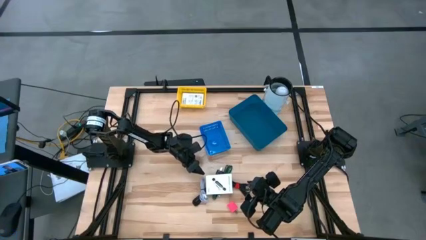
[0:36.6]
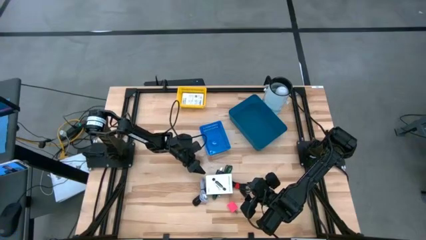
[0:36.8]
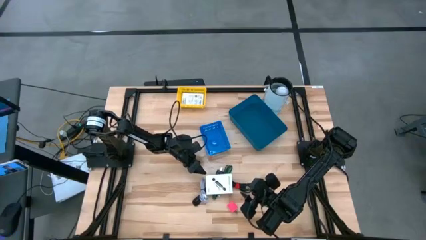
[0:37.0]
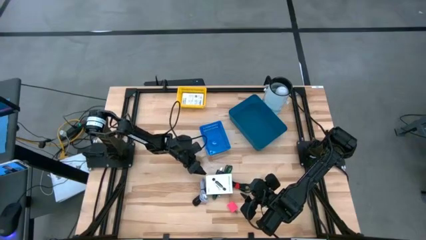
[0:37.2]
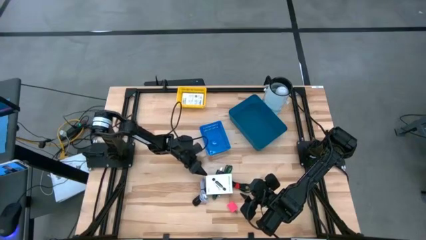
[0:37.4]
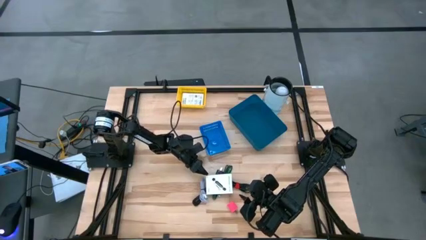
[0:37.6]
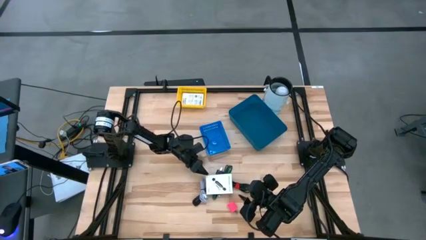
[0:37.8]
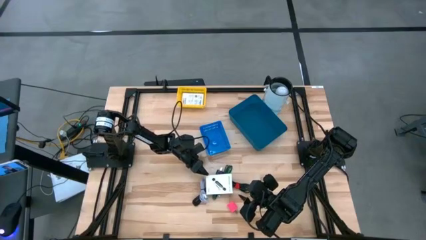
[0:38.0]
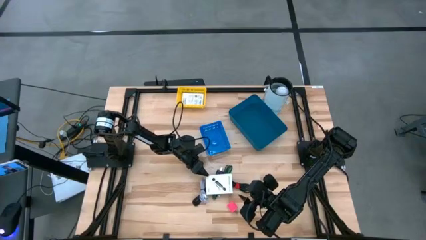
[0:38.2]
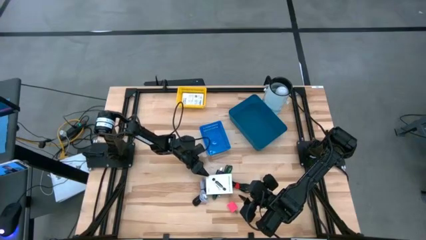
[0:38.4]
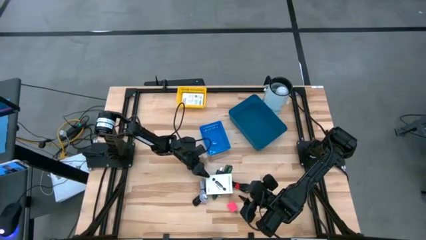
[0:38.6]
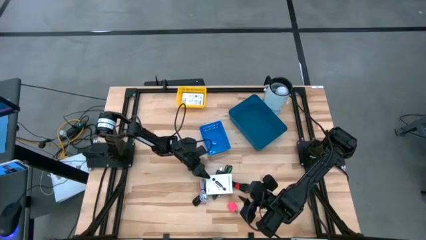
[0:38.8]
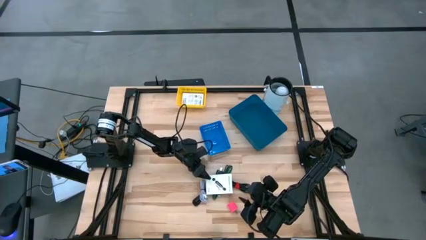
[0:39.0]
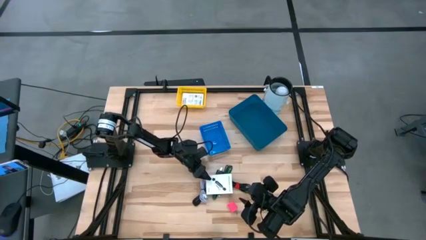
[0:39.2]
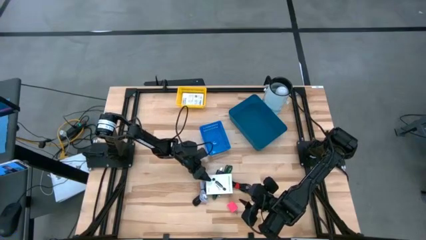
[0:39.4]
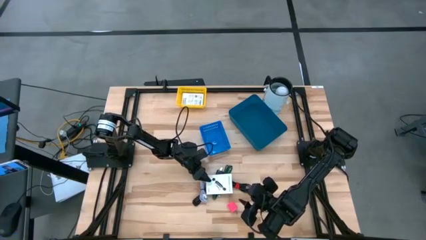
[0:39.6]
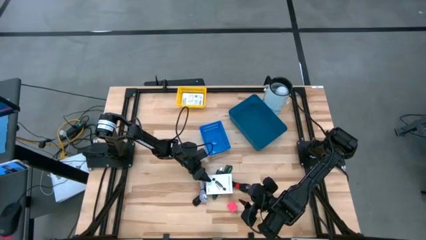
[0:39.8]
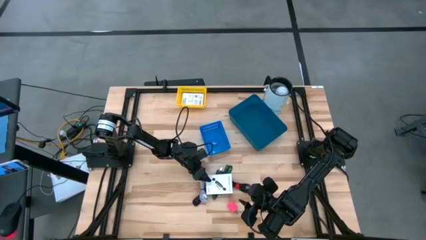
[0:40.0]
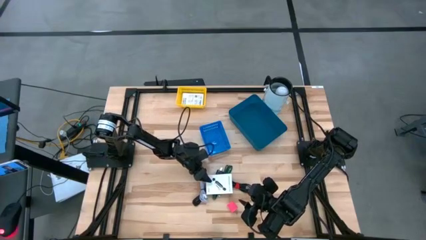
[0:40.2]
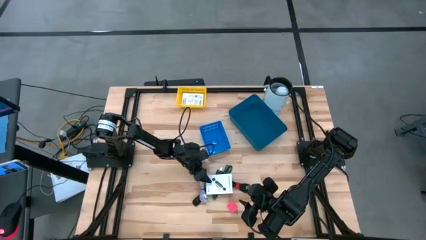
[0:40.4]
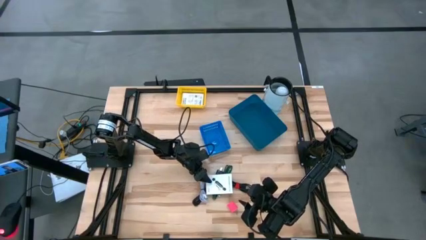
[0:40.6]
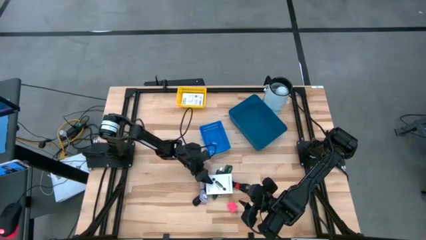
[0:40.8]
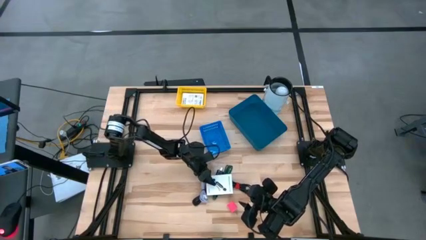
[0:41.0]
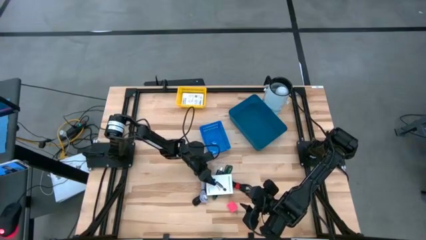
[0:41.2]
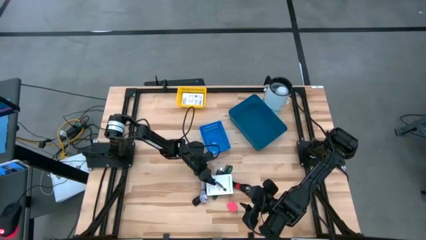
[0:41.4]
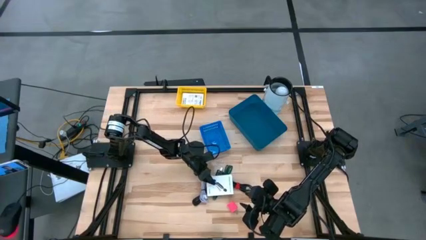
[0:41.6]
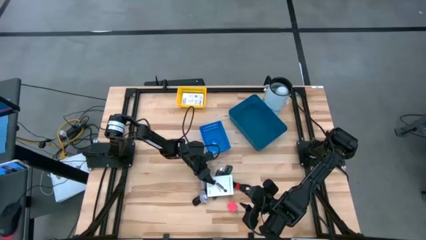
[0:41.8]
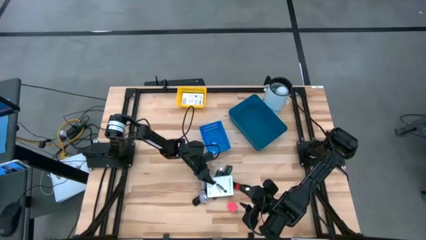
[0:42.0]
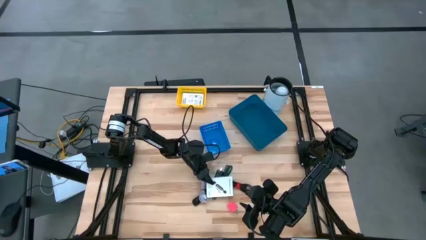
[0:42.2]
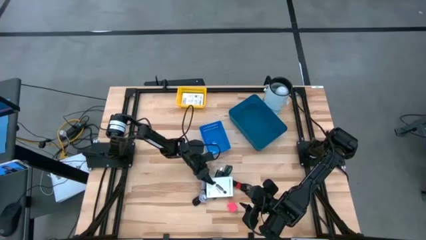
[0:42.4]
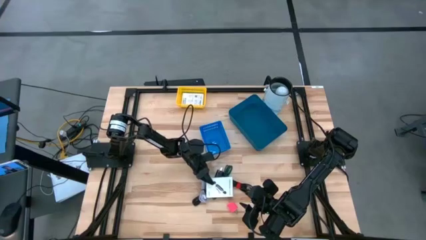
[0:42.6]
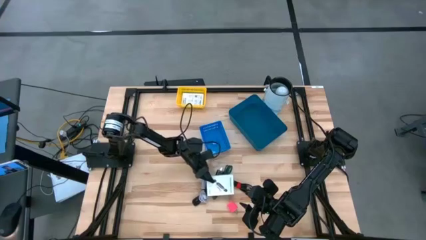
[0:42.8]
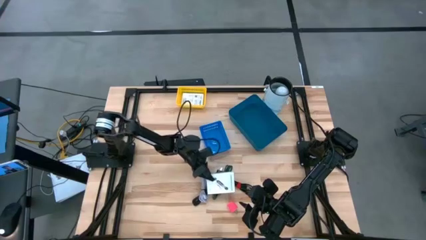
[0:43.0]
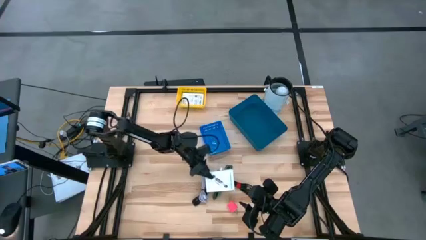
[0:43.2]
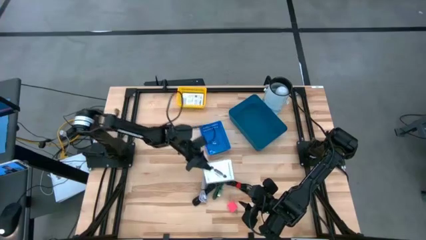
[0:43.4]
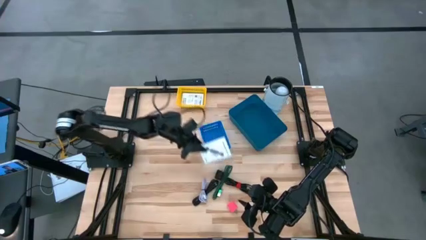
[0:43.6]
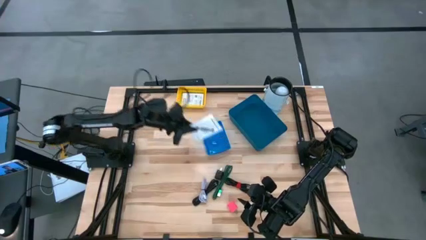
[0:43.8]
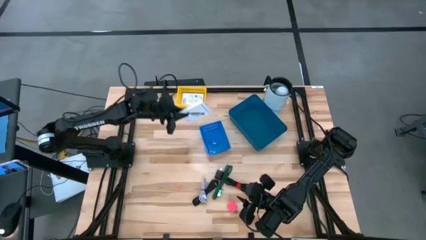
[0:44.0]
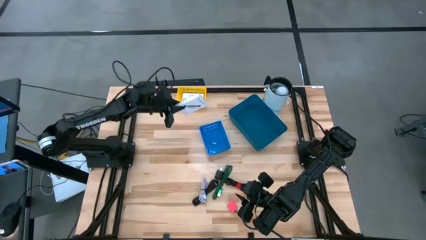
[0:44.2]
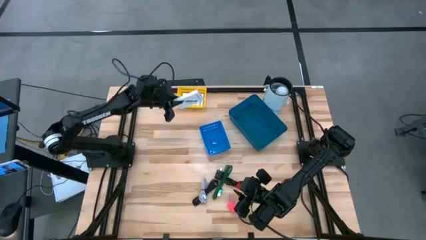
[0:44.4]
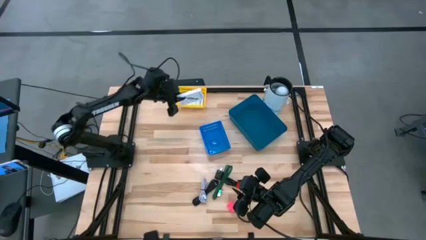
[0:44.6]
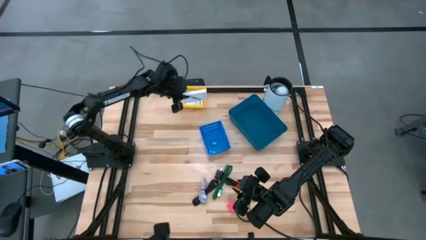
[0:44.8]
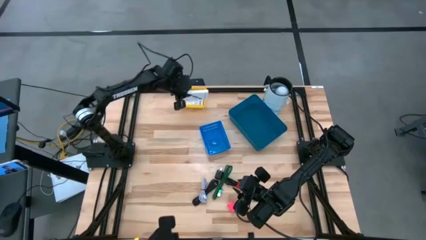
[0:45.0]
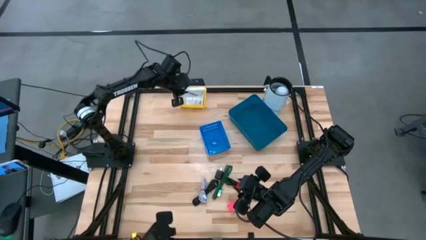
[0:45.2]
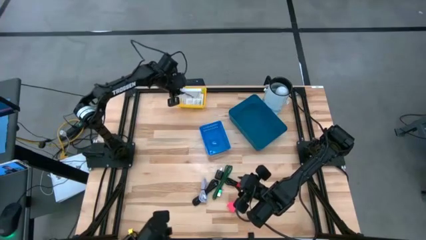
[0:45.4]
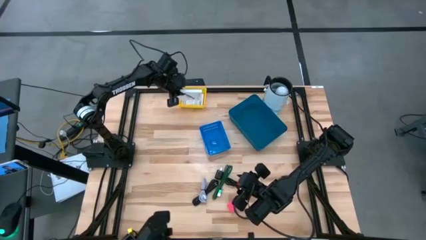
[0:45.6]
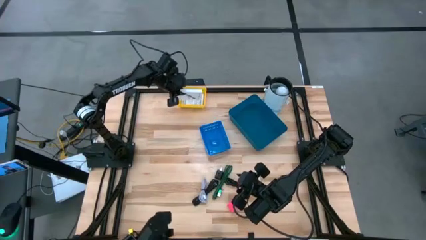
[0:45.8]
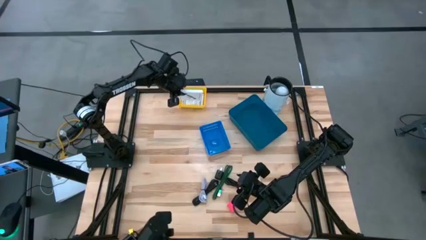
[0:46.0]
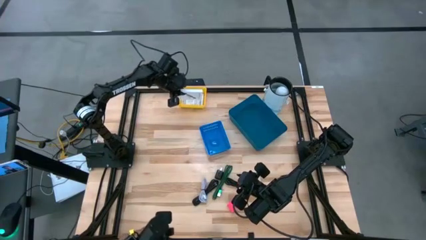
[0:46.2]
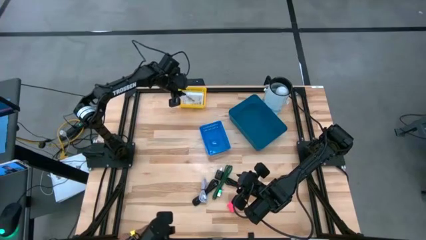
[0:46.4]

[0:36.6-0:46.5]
Task: Pick and place items into bin
Put the white card reader box into the yellow bin

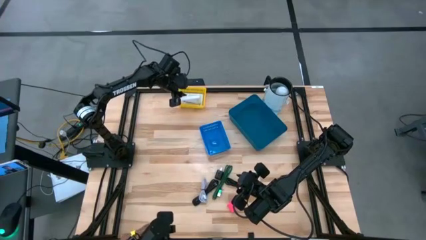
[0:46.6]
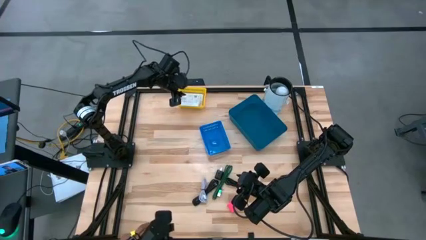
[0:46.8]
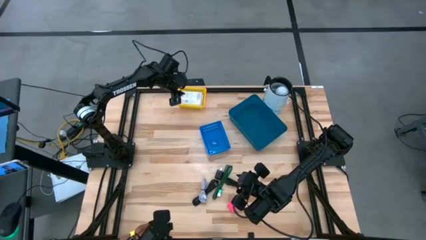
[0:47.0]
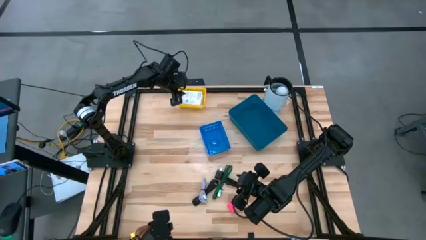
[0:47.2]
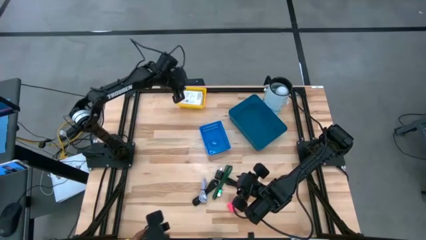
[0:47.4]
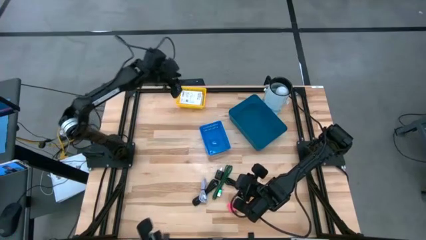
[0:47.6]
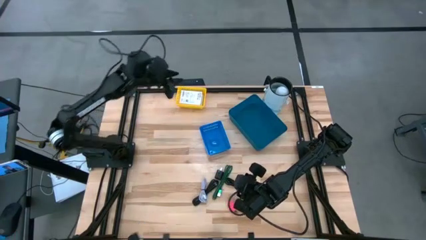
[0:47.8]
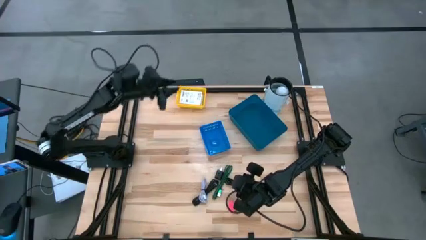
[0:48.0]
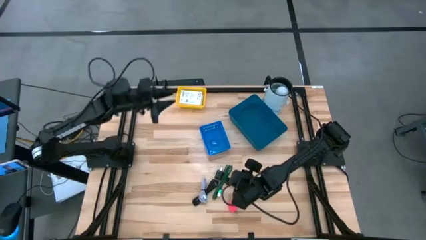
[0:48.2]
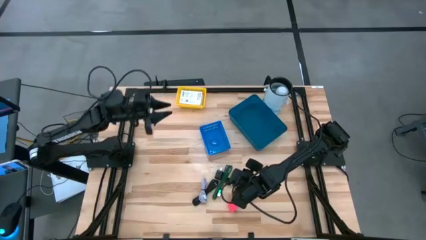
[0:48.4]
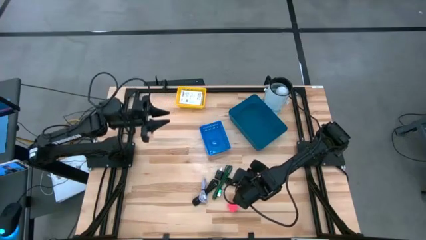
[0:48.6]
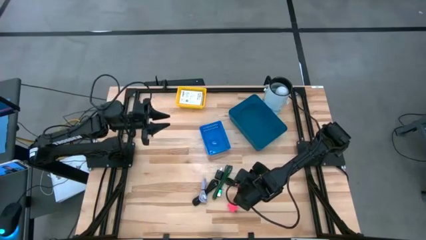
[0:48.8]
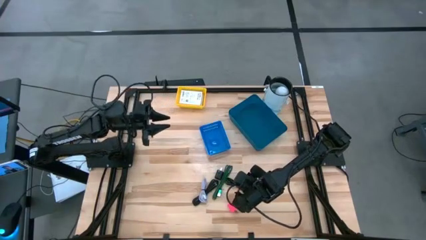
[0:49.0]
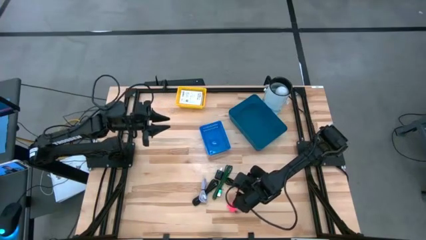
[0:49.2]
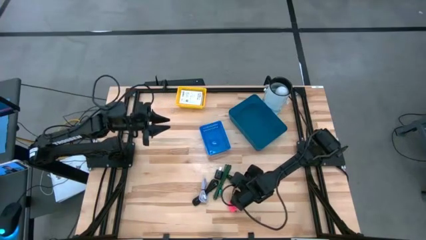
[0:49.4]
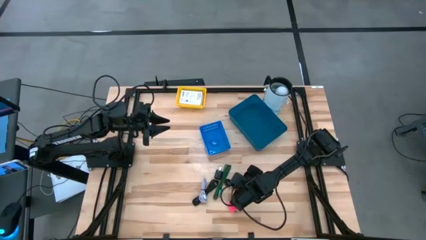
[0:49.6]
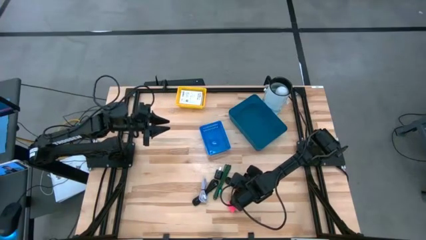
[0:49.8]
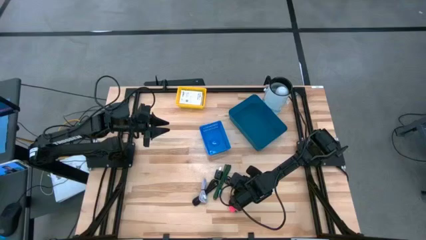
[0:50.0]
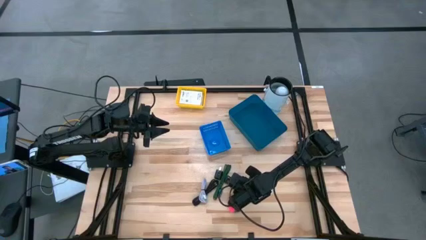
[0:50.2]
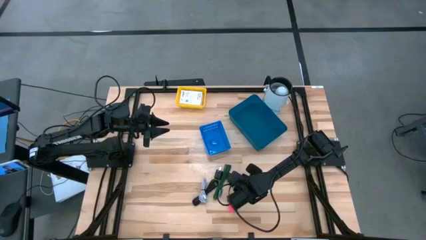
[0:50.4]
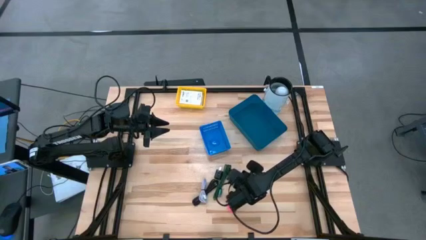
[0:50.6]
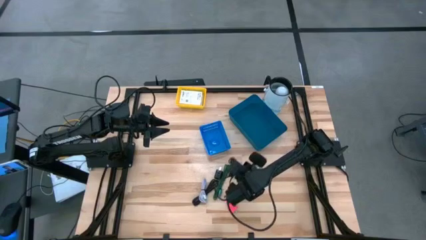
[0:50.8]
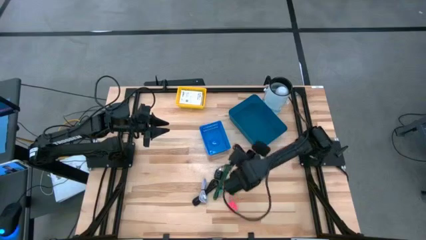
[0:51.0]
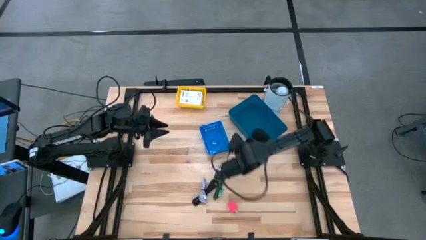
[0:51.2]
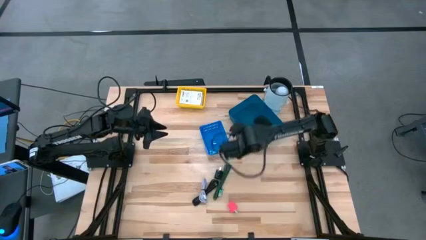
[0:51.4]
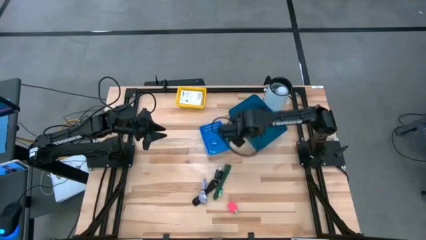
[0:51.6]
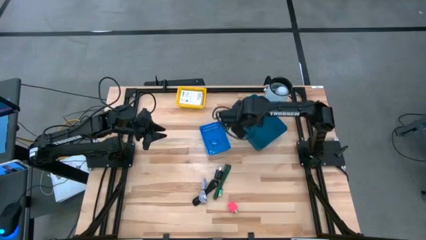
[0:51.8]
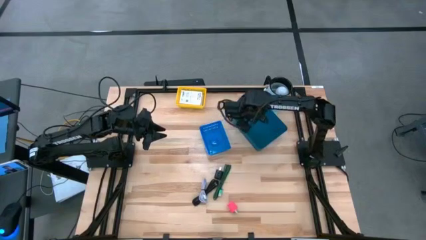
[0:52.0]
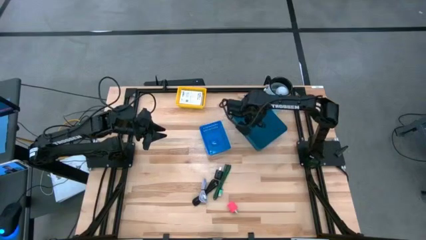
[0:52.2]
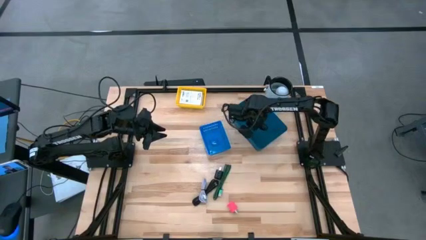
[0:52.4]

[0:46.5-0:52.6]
Put the black charger cable into the dark blue bin
